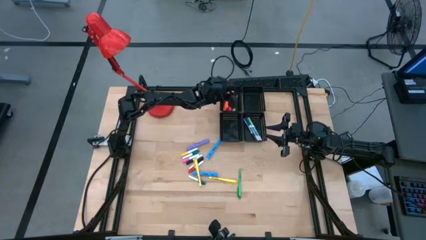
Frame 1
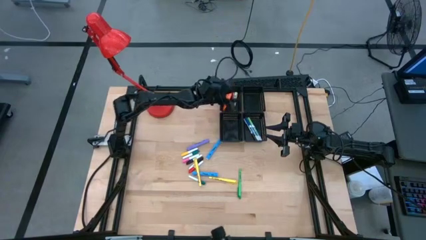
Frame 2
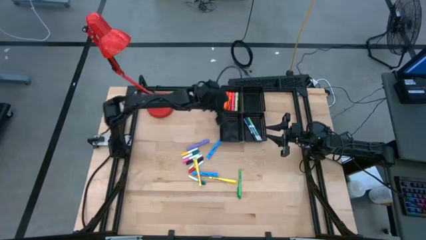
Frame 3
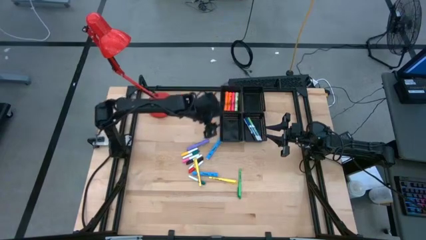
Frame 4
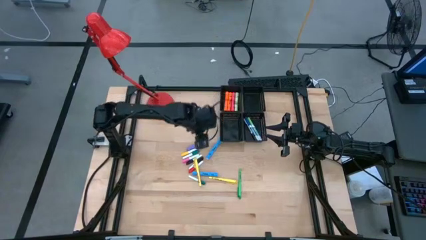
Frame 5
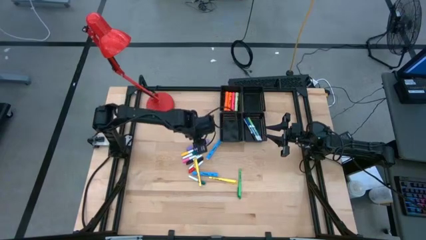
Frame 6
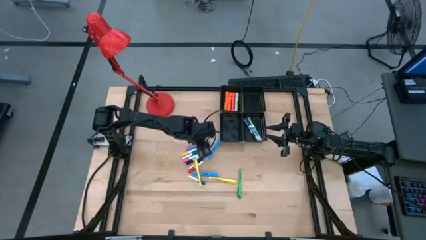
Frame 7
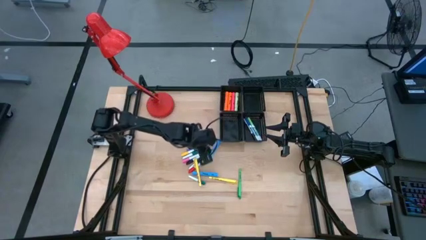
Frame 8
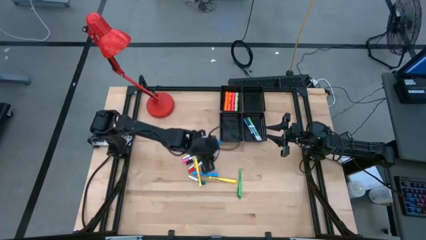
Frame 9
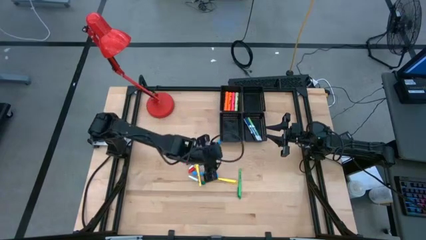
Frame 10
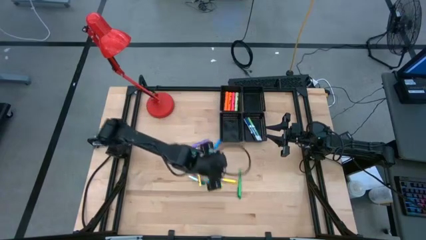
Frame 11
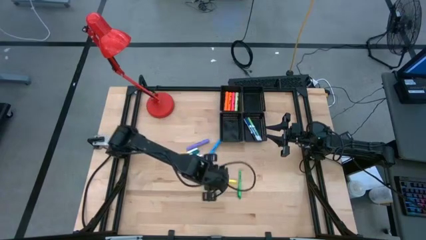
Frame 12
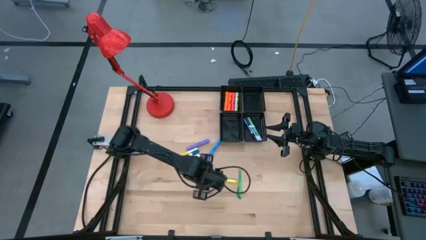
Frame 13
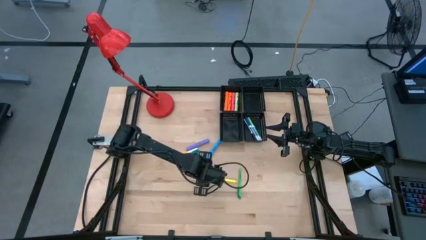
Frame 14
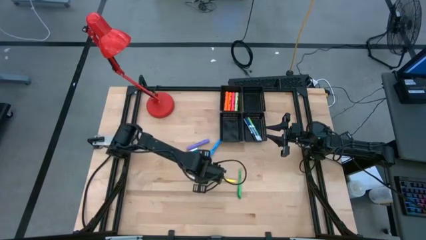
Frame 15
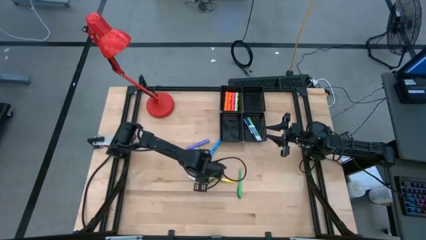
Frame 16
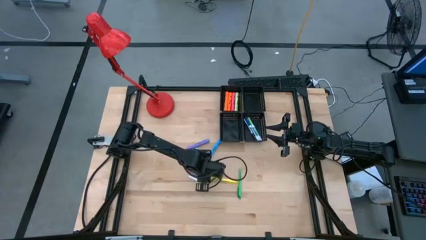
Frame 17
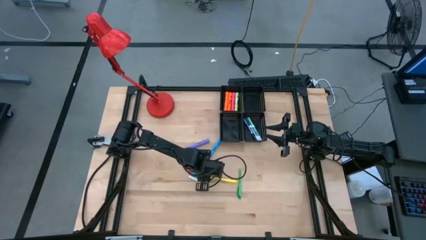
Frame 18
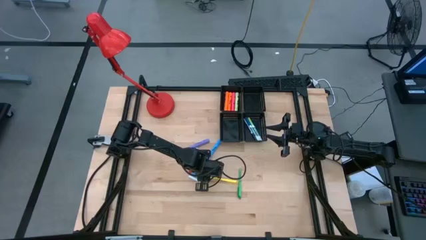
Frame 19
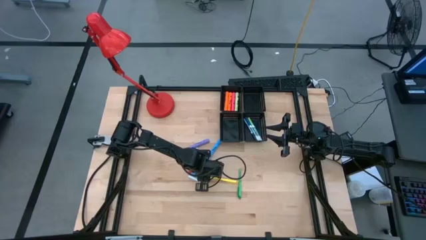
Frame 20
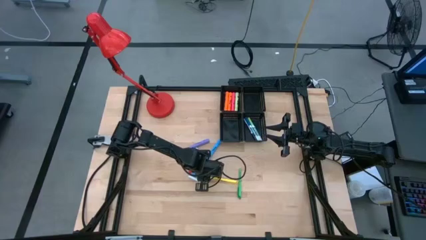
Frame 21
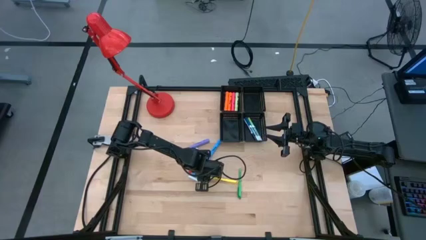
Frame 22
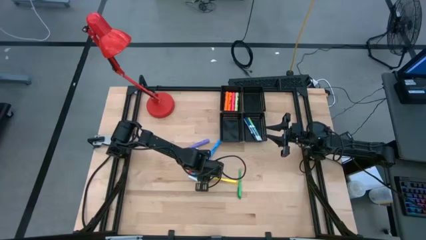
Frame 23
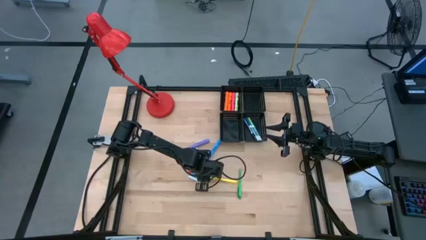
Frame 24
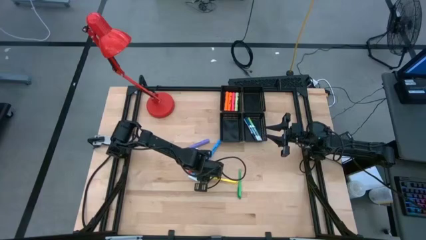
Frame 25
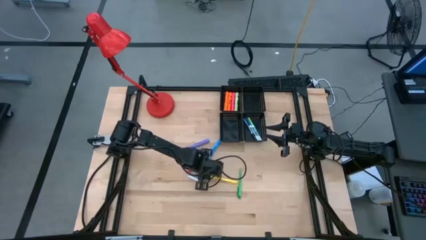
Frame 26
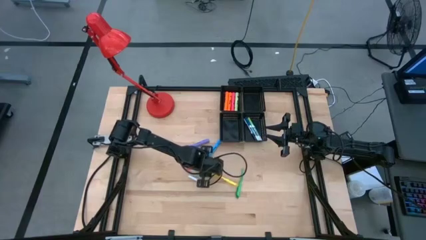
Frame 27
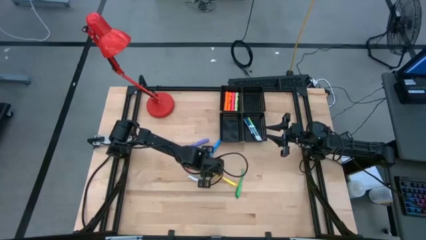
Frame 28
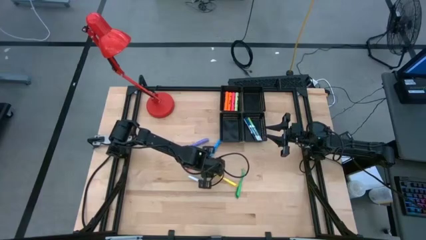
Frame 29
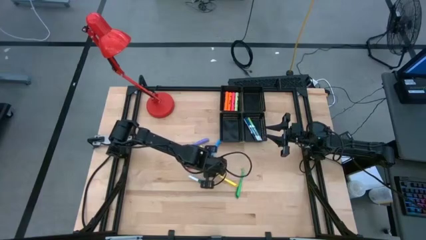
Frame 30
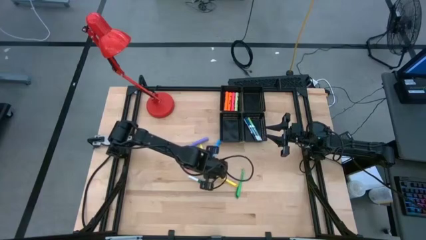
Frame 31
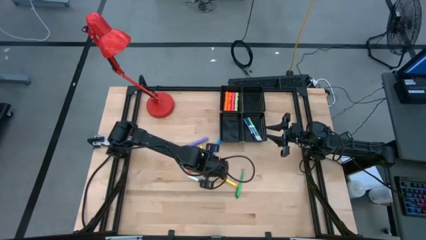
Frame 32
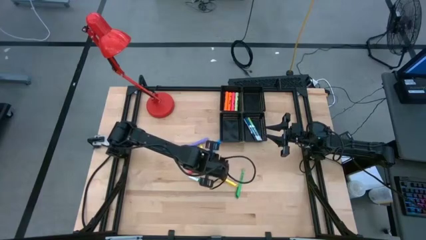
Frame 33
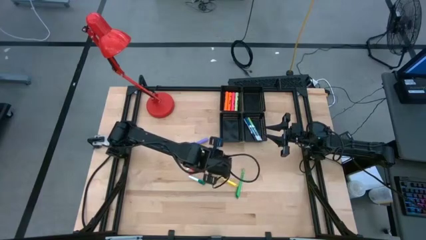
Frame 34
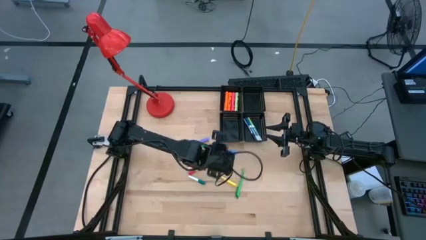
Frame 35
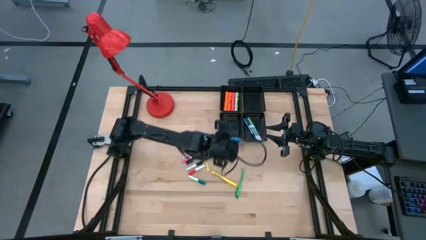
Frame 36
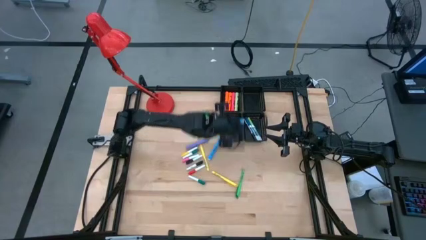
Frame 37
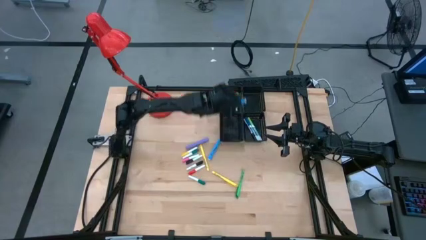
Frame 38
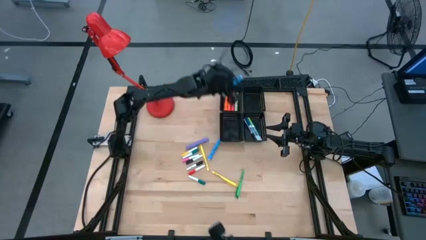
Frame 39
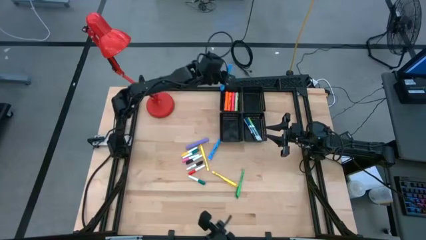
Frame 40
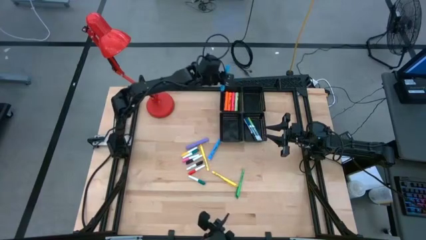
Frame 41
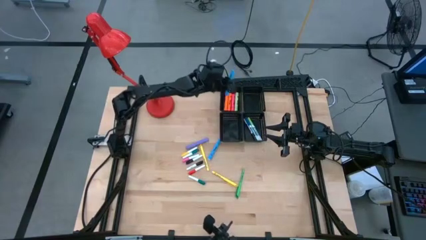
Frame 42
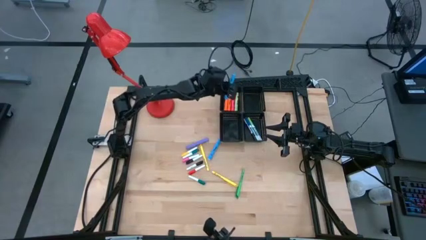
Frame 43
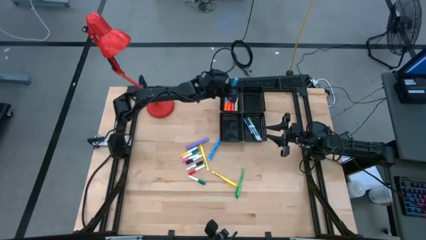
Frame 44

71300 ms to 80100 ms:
Task: Pick & Place Markers
Put the blue highlighter pen into the top left black bin

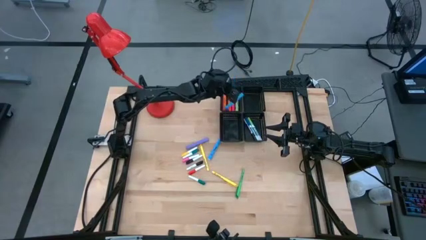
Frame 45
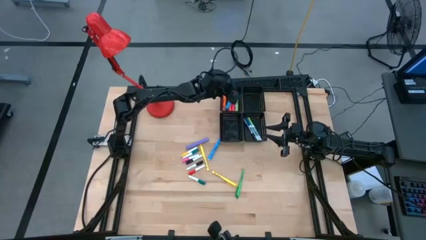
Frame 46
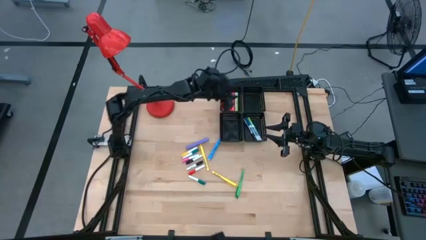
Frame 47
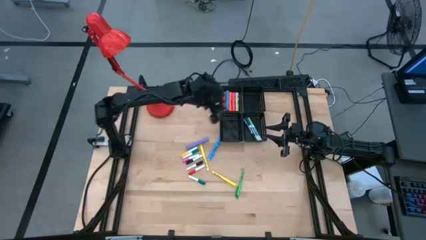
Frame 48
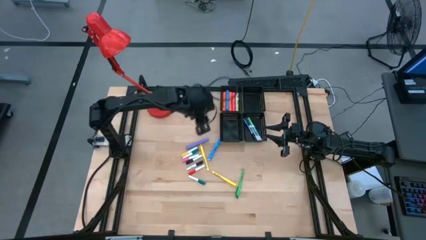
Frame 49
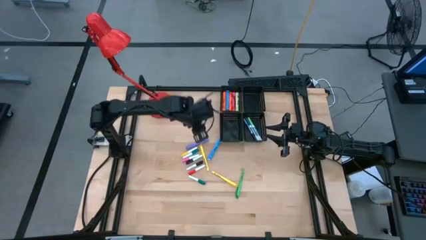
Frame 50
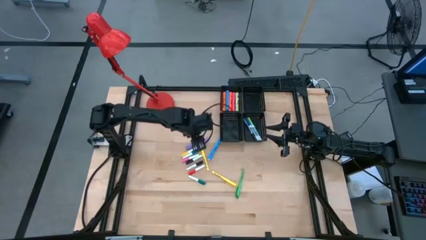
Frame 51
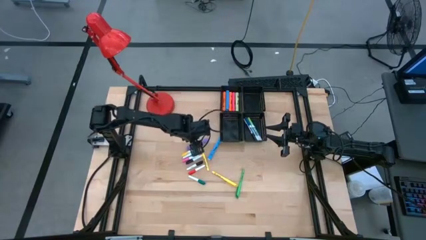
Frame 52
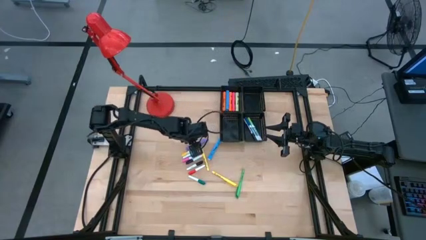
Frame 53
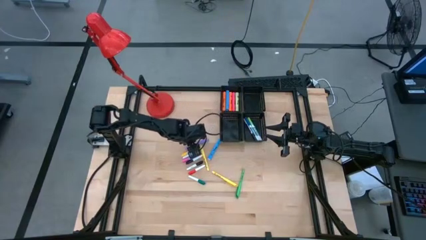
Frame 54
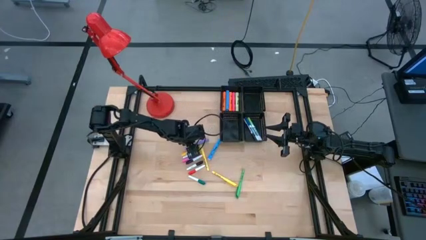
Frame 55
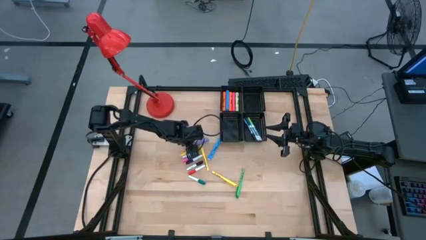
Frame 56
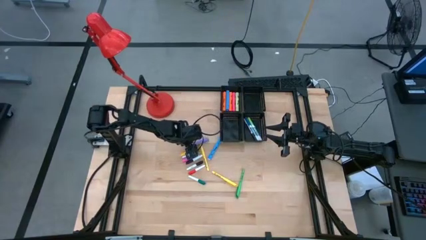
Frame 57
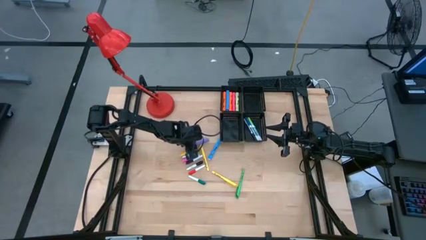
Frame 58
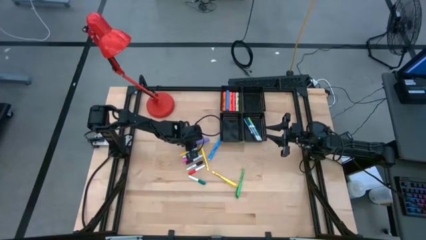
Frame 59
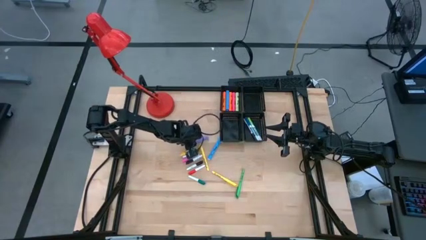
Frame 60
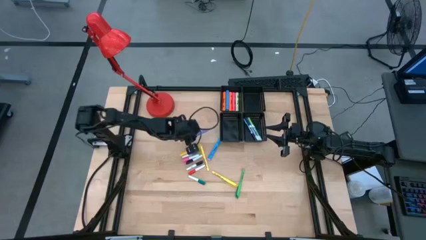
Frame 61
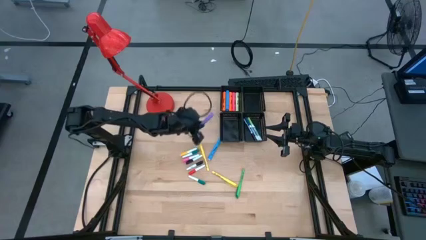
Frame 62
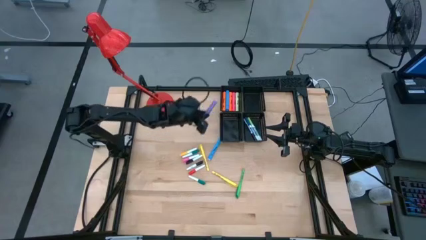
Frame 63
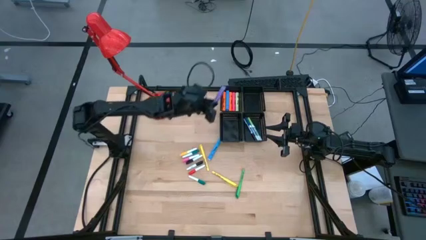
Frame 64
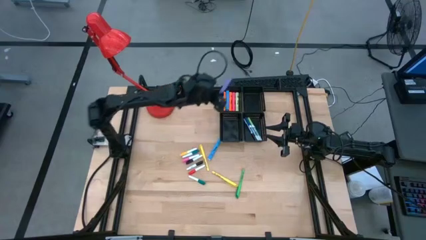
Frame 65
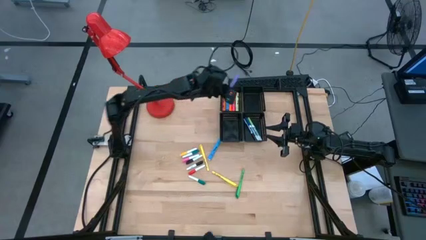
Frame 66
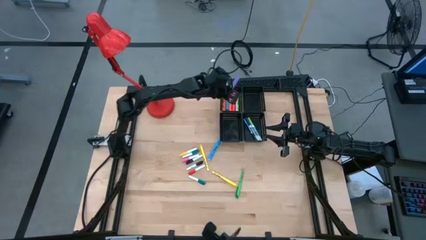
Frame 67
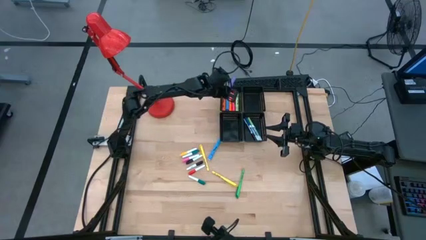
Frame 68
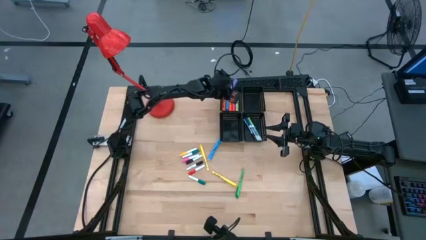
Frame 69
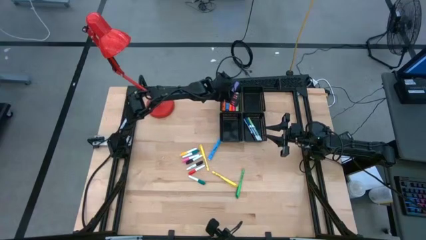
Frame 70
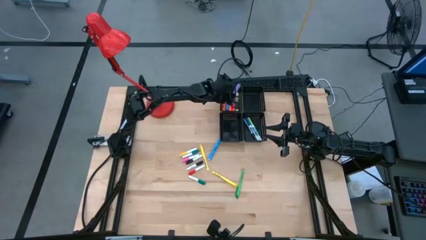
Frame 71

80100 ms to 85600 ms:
Put the violet highlighter pen into the top left black bin

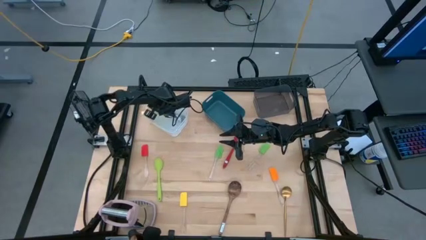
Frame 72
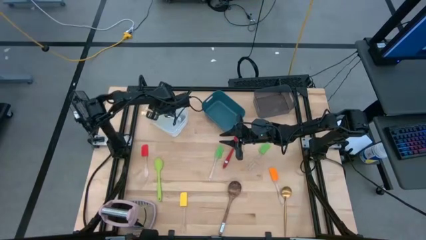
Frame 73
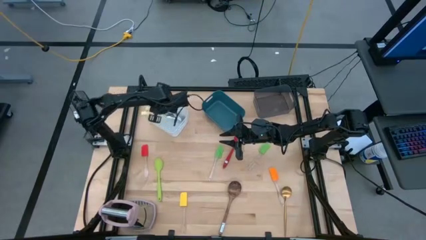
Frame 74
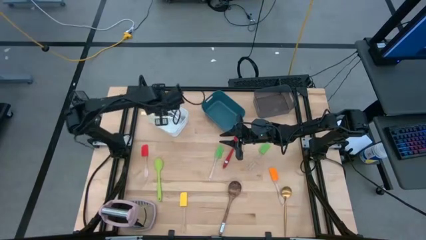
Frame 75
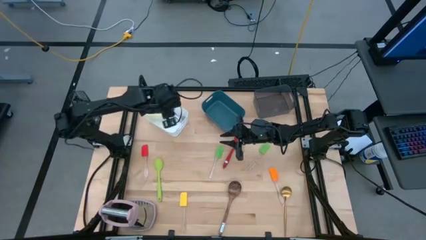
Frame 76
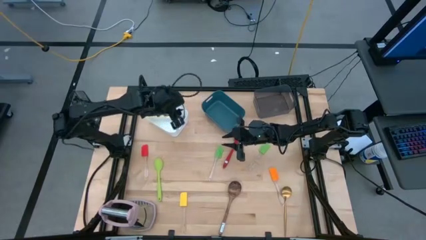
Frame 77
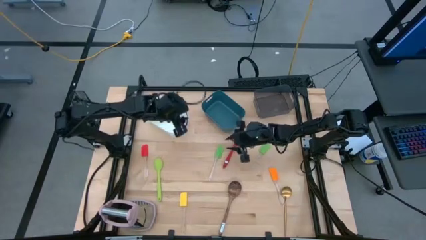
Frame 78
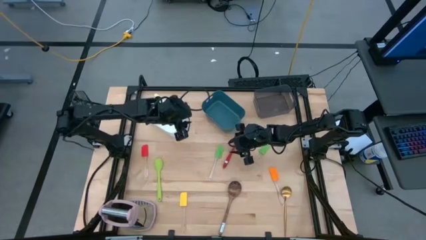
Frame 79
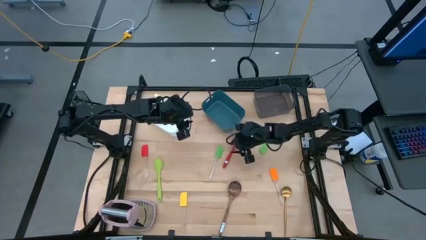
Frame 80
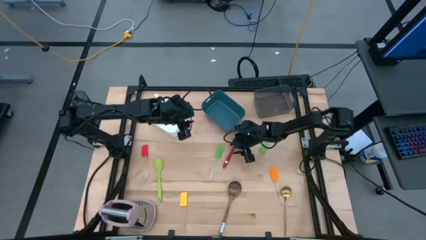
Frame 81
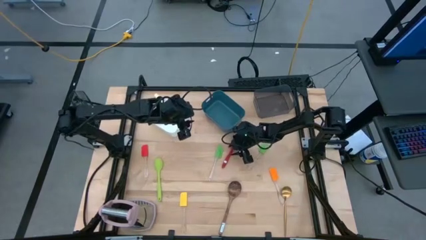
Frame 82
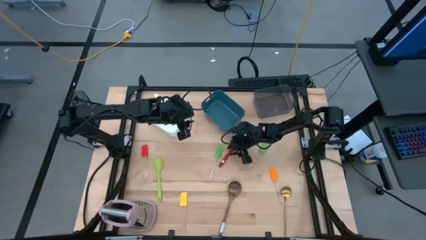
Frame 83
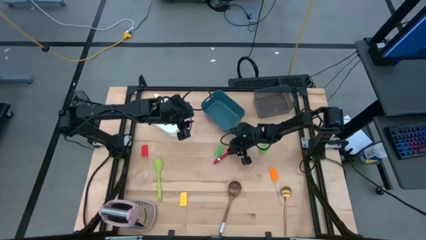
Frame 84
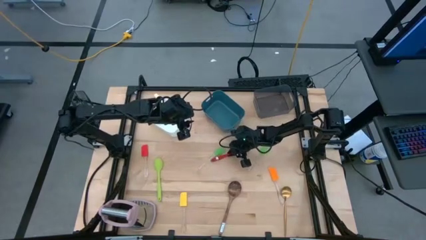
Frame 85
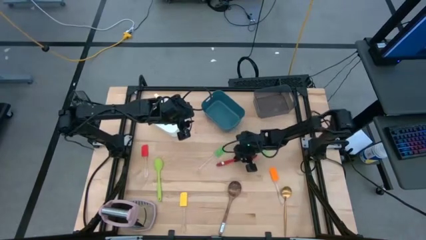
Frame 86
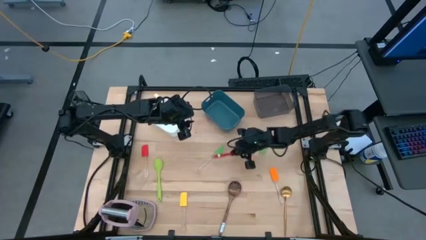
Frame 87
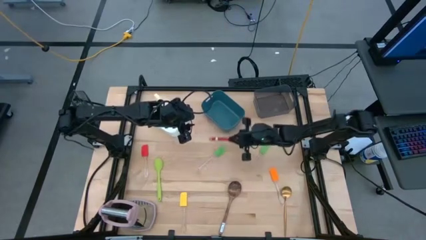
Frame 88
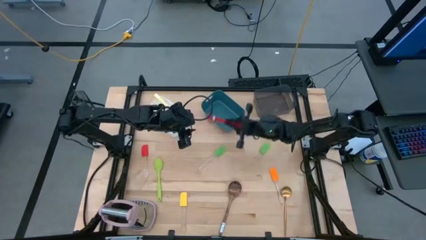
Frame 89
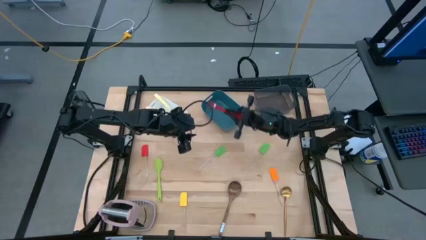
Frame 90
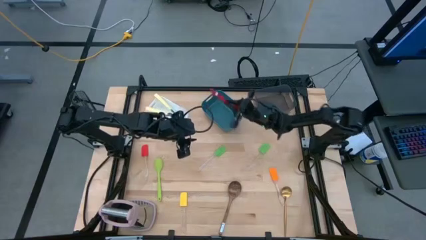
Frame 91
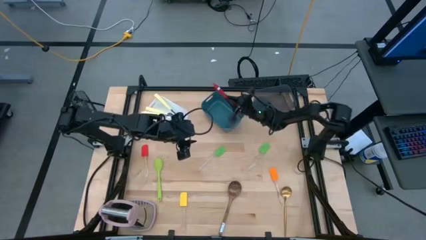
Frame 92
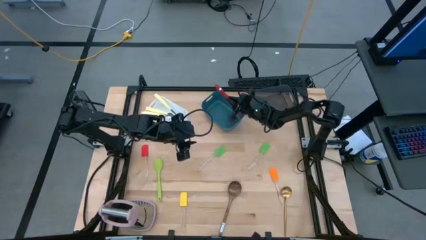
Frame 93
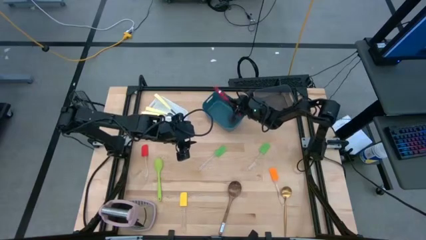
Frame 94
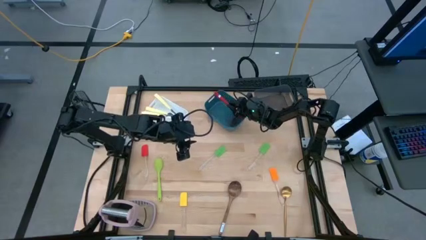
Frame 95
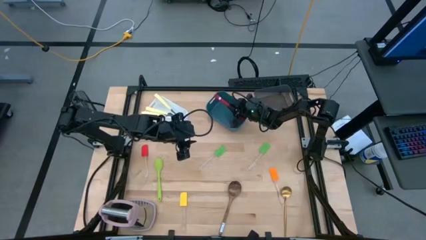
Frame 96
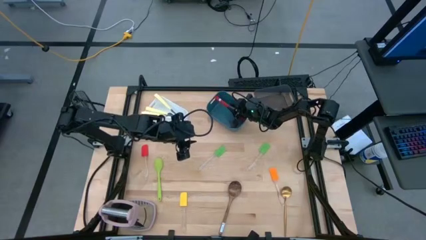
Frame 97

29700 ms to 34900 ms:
Task: Pick & Place Kitchen Items
Put the red serving spoon into the blue bin
